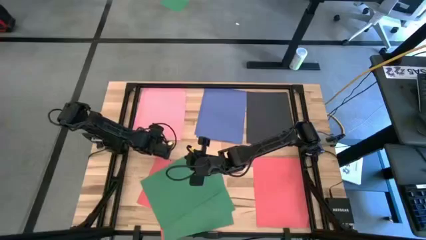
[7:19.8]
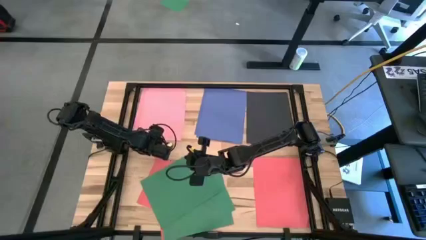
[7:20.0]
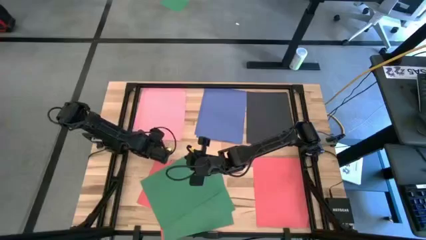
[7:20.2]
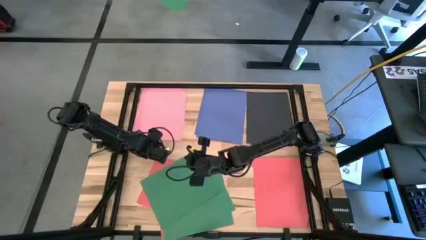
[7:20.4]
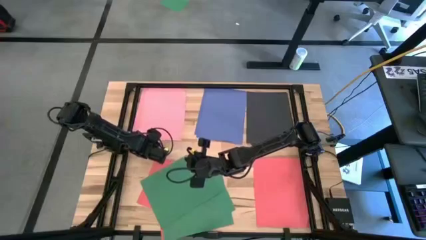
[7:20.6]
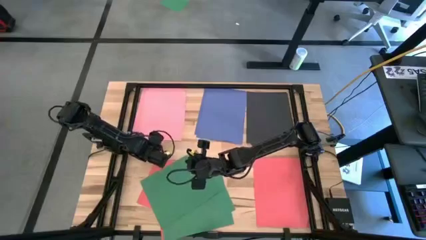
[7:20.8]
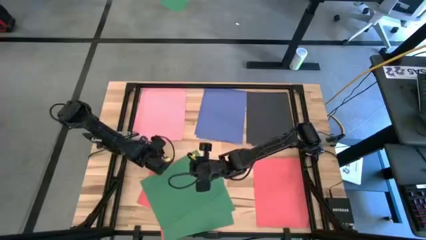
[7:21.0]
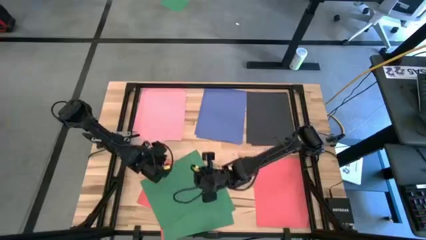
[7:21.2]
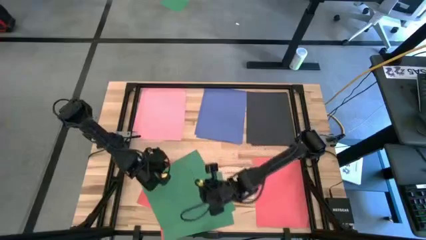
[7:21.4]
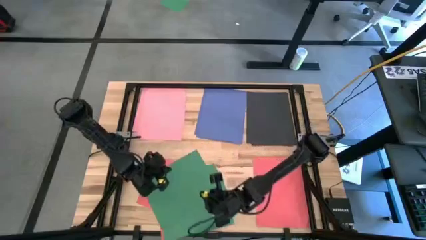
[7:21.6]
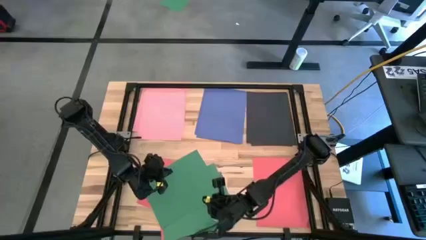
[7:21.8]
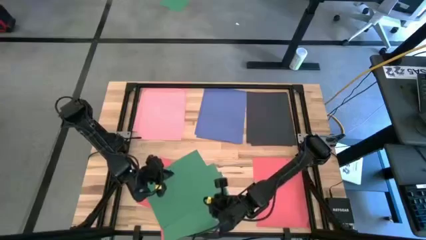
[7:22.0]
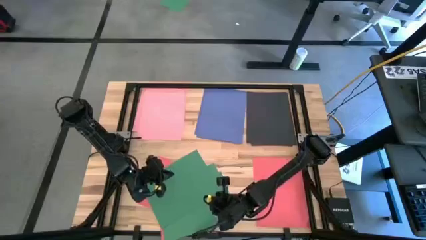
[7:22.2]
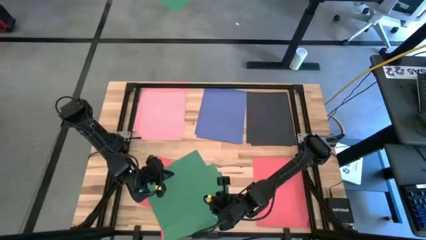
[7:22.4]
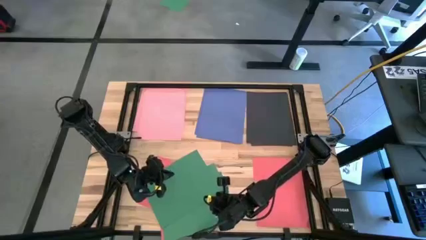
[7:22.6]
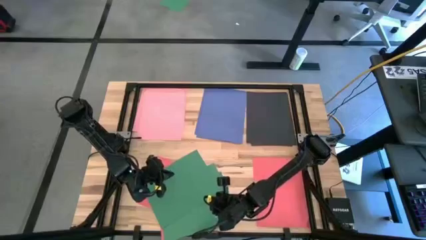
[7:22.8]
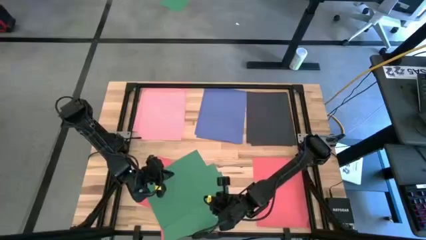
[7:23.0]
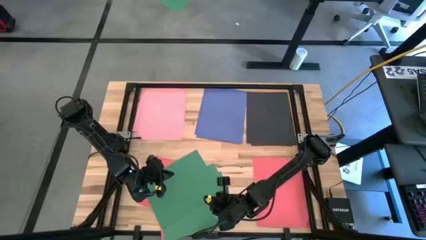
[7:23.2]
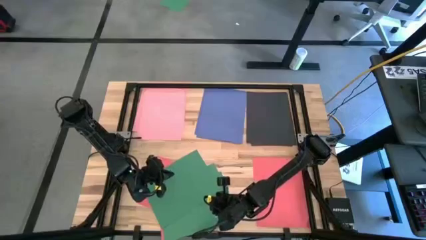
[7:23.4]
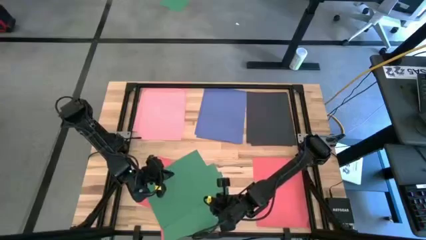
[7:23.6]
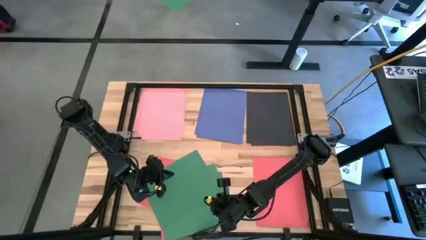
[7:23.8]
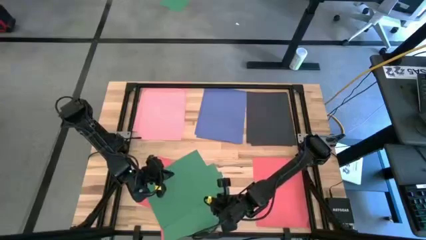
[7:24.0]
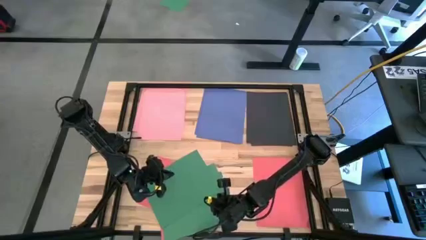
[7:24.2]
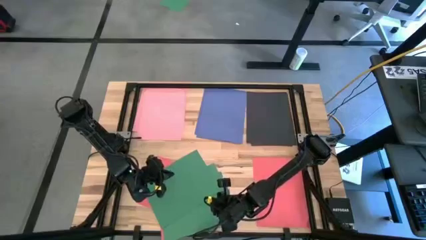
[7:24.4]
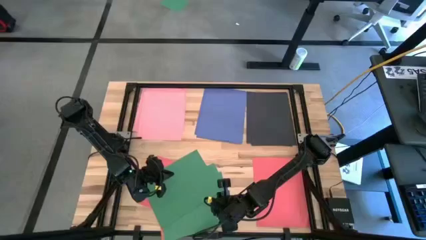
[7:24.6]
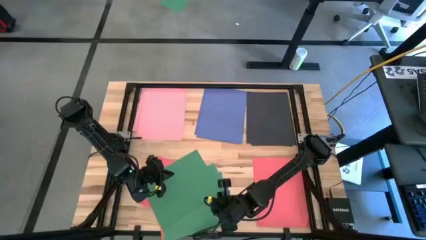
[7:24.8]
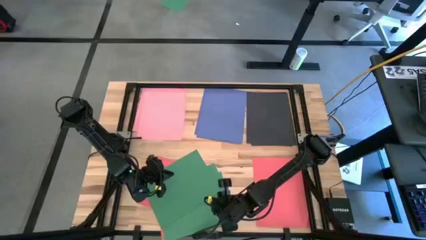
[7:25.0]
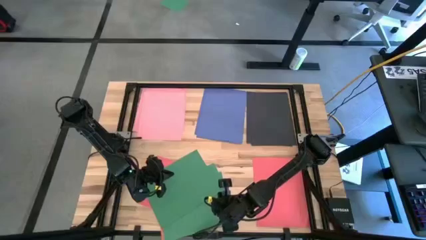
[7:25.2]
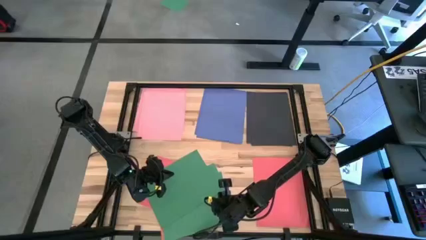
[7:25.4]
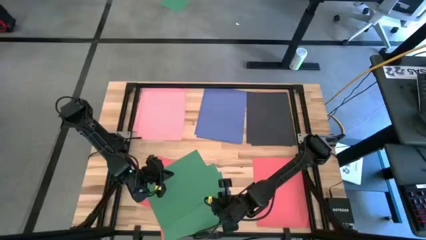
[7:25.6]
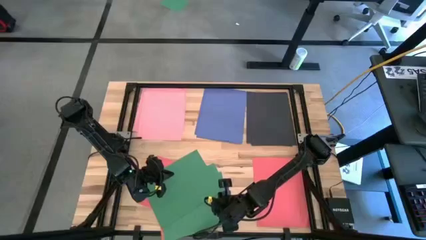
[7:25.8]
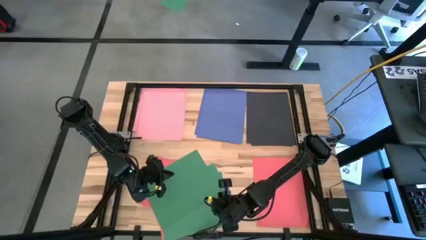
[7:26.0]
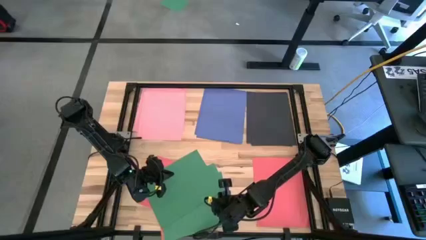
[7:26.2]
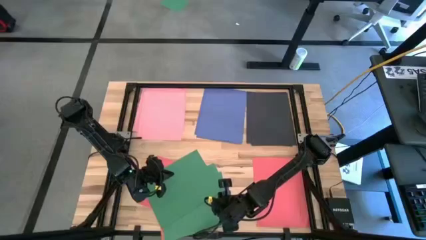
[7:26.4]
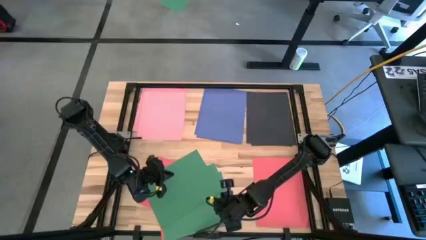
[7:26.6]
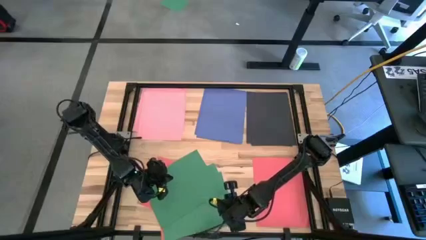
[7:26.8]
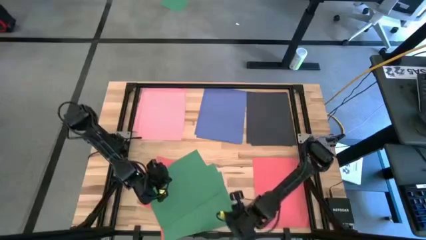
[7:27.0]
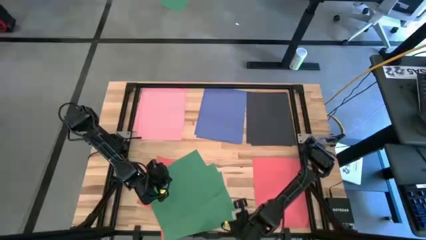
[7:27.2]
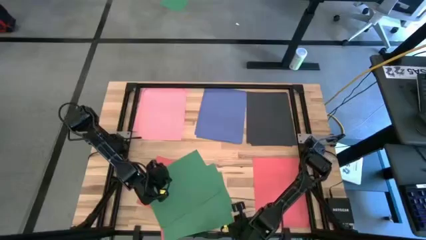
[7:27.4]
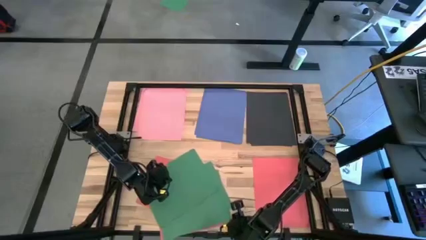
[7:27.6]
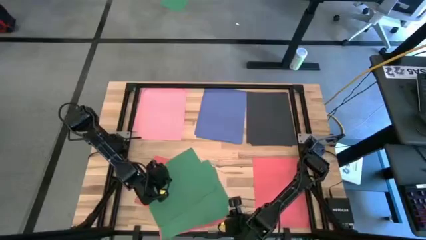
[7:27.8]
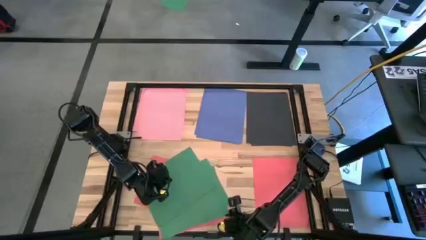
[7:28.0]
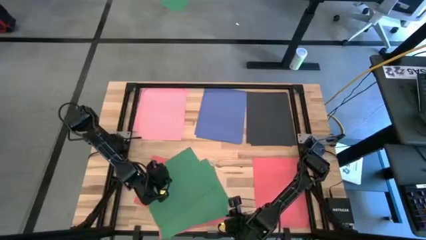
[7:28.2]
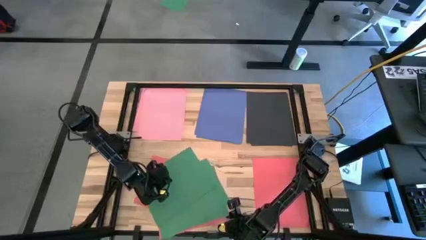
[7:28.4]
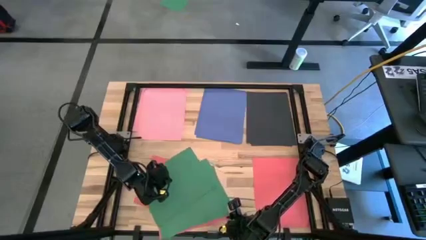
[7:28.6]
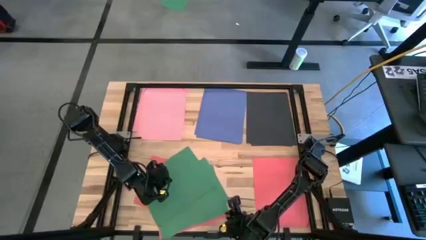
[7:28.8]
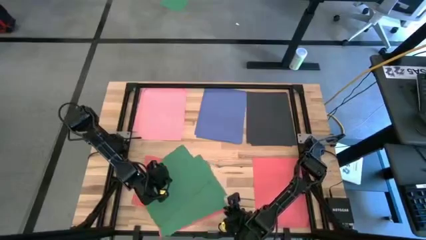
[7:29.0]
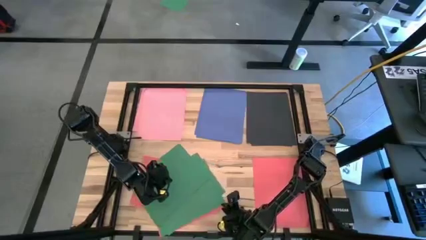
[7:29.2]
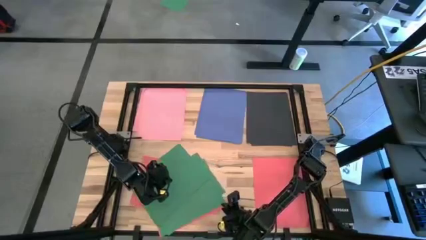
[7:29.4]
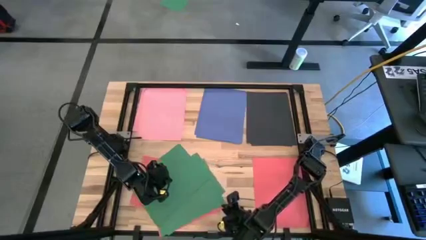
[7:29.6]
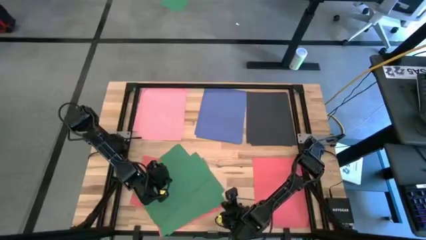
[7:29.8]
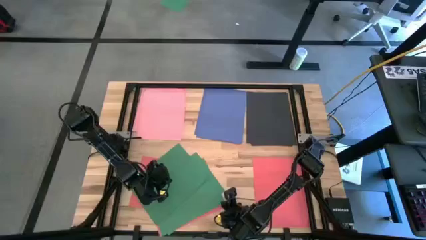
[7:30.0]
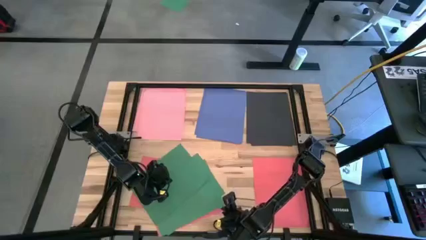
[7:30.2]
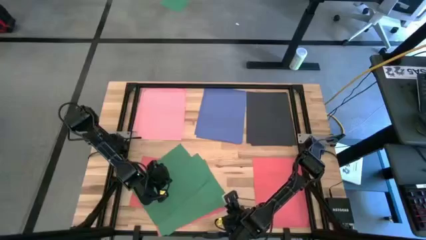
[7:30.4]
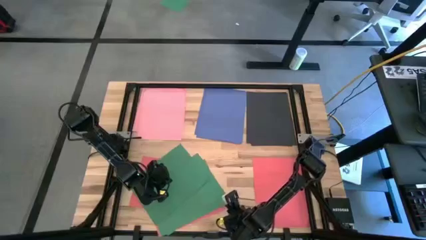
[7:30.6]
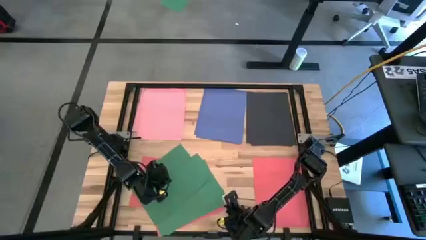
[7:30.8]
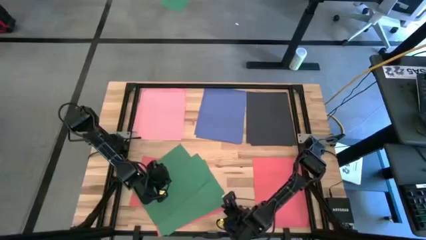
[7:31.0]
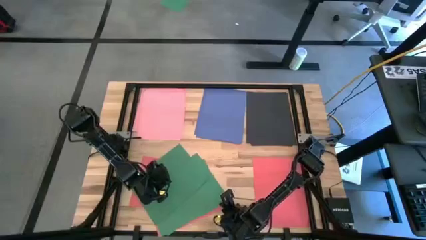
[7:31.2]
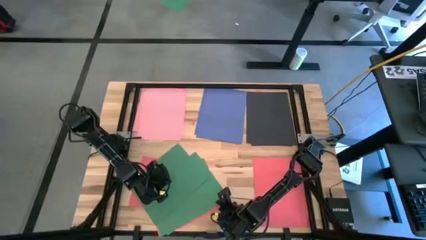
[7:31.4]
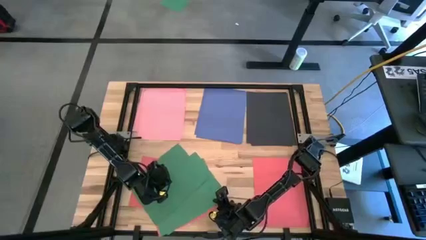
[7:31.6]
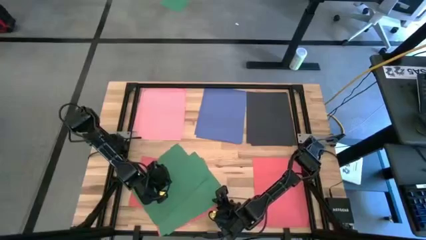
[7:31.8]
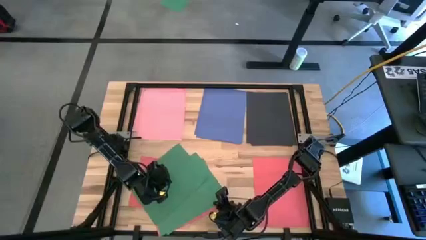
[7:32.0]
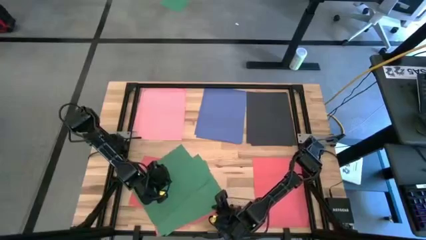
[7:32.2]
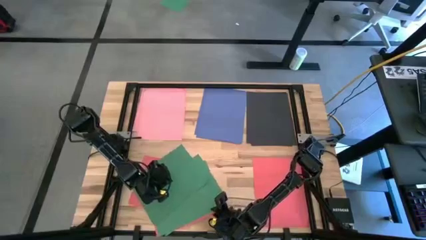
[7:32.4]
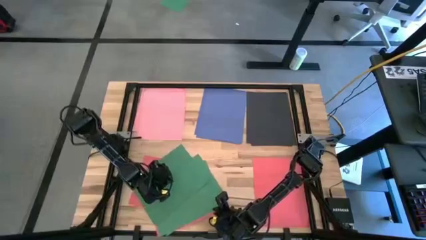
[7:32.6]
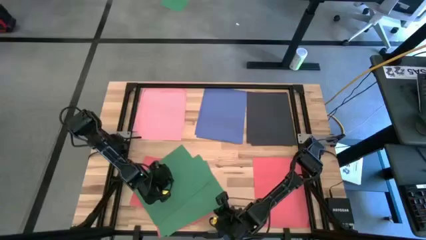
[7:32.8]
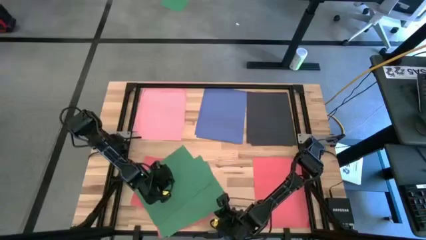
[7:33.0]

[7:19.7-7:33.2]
Task: Organize paper
Stack the red paper on top of the other red paper on the table
